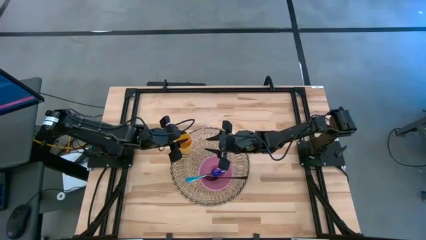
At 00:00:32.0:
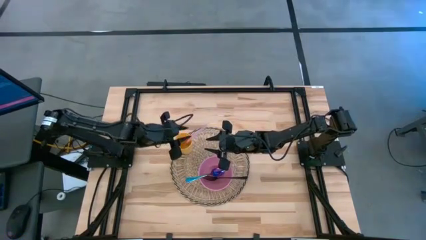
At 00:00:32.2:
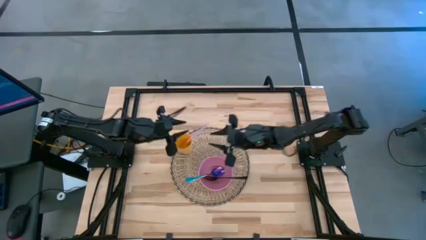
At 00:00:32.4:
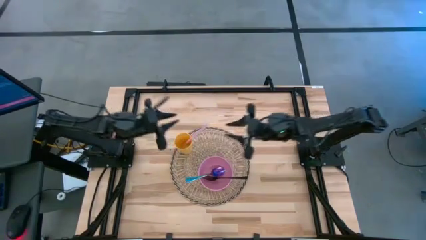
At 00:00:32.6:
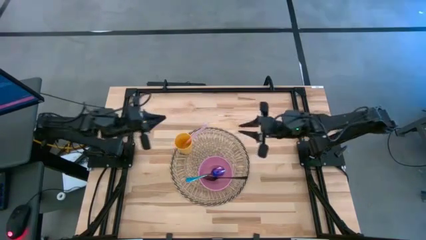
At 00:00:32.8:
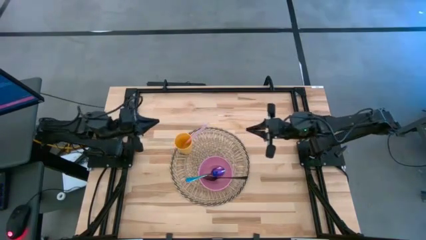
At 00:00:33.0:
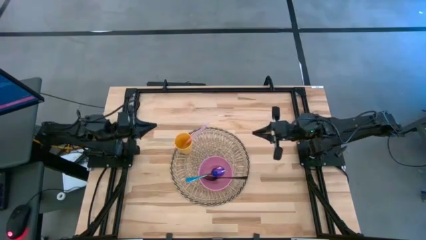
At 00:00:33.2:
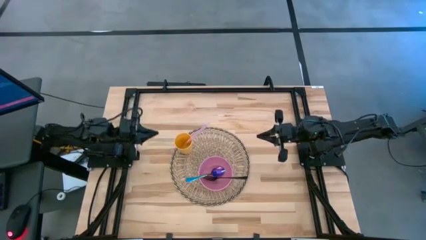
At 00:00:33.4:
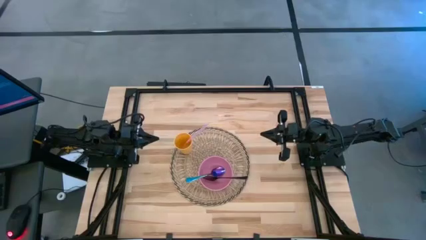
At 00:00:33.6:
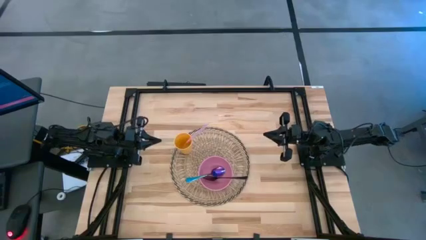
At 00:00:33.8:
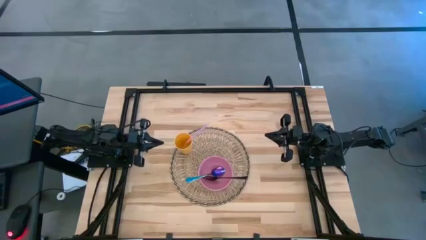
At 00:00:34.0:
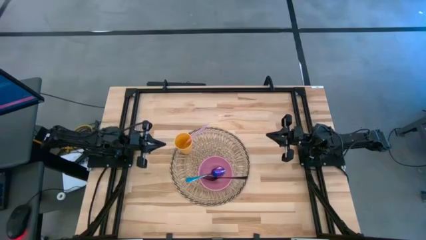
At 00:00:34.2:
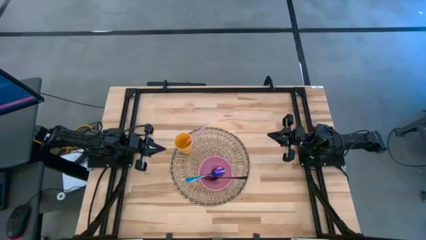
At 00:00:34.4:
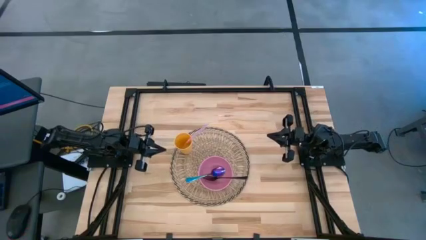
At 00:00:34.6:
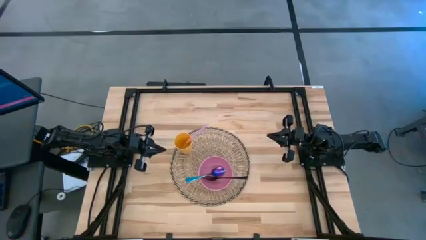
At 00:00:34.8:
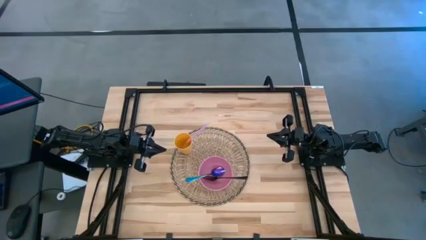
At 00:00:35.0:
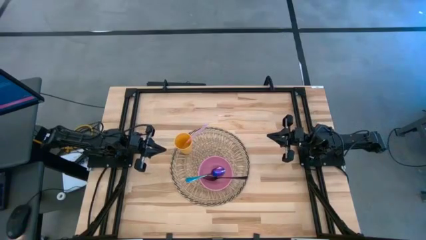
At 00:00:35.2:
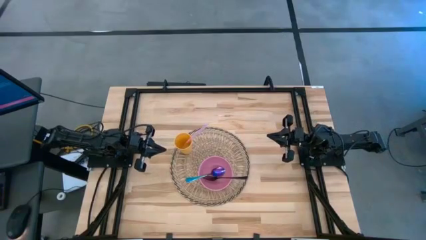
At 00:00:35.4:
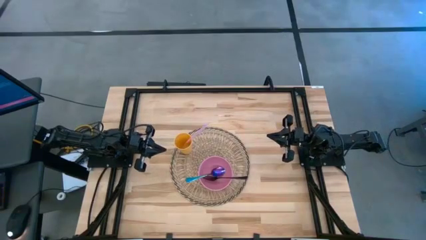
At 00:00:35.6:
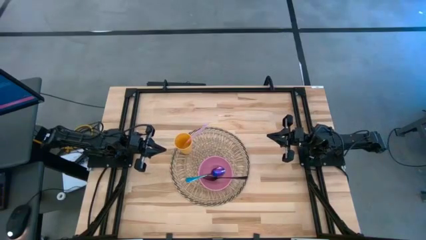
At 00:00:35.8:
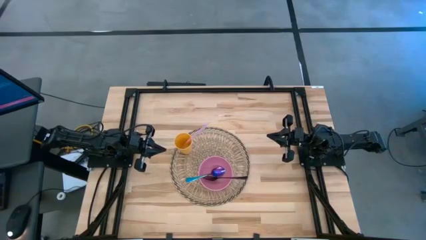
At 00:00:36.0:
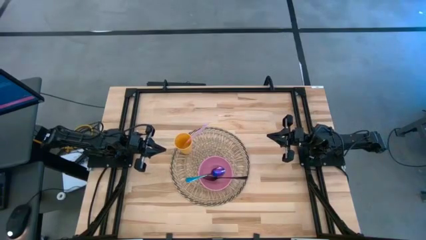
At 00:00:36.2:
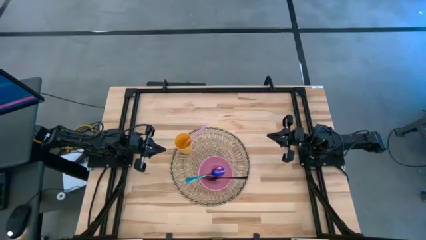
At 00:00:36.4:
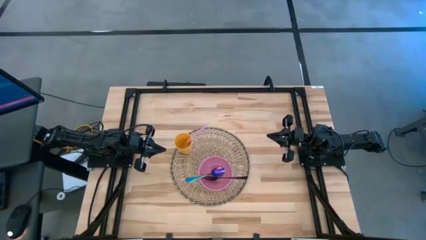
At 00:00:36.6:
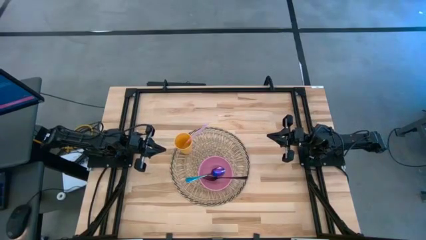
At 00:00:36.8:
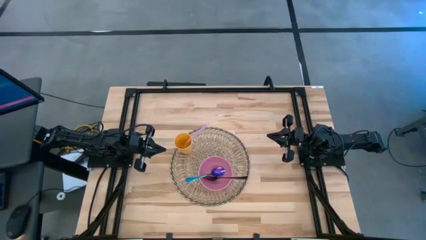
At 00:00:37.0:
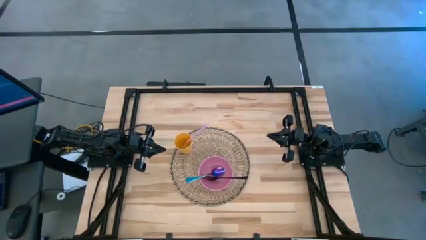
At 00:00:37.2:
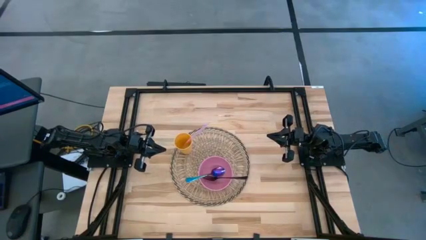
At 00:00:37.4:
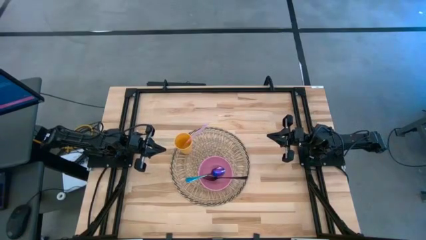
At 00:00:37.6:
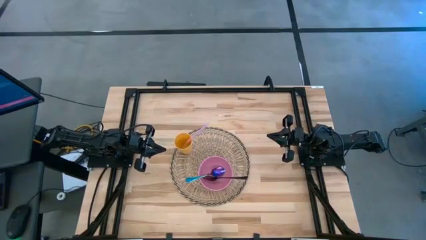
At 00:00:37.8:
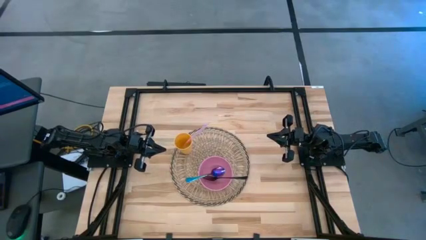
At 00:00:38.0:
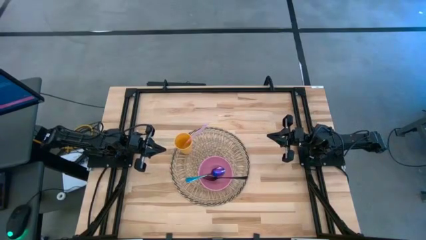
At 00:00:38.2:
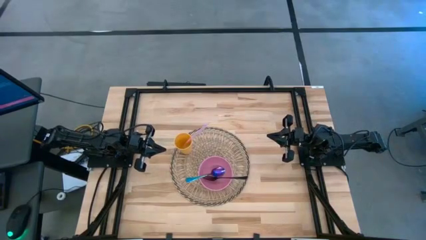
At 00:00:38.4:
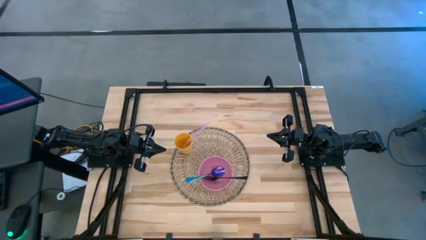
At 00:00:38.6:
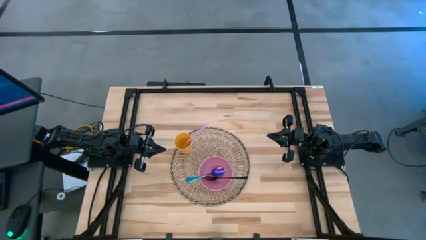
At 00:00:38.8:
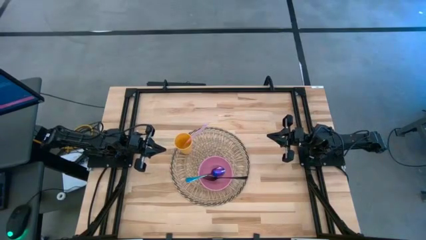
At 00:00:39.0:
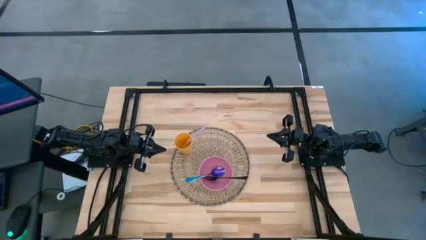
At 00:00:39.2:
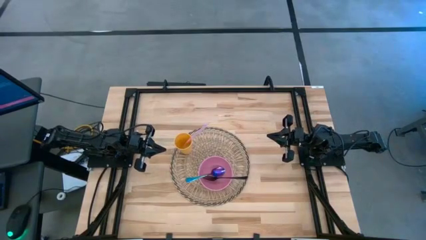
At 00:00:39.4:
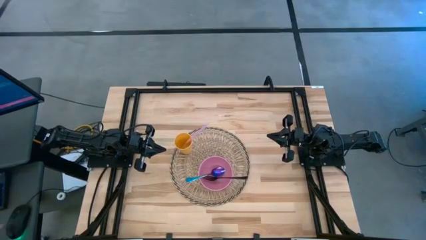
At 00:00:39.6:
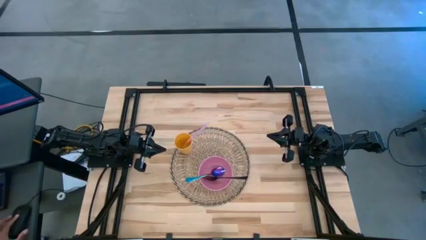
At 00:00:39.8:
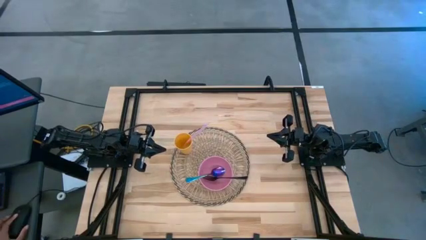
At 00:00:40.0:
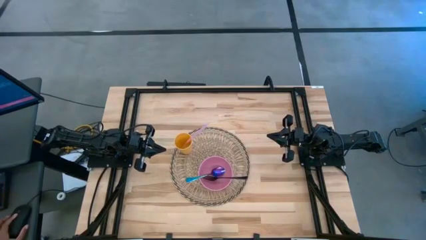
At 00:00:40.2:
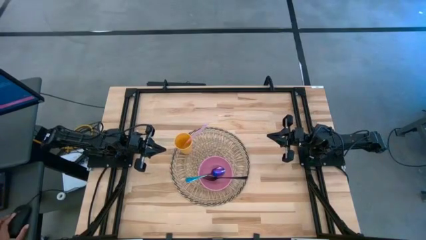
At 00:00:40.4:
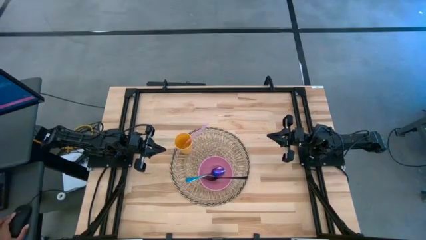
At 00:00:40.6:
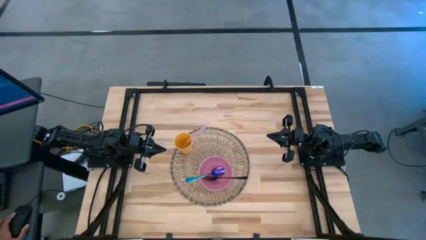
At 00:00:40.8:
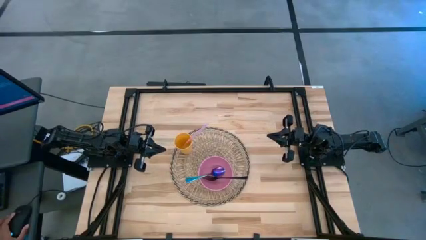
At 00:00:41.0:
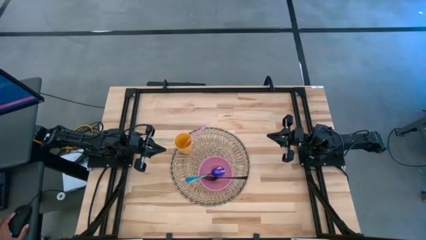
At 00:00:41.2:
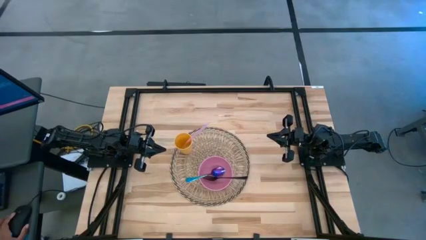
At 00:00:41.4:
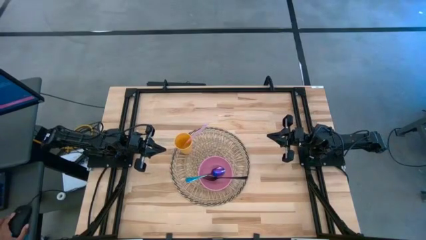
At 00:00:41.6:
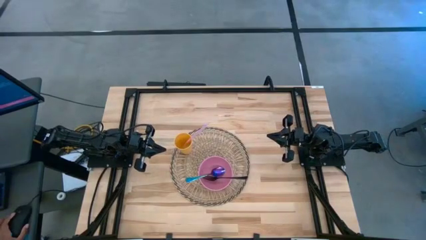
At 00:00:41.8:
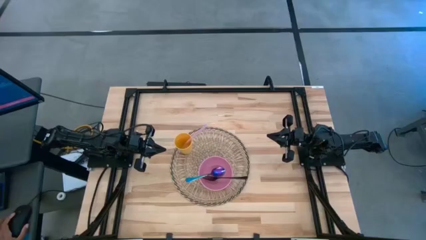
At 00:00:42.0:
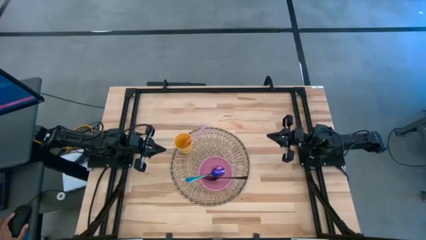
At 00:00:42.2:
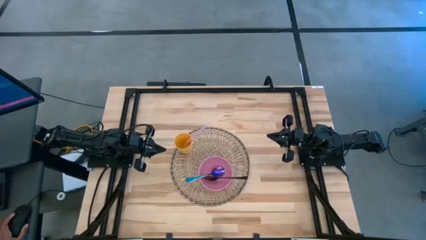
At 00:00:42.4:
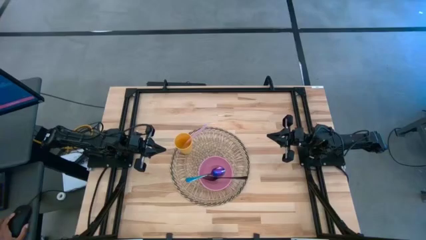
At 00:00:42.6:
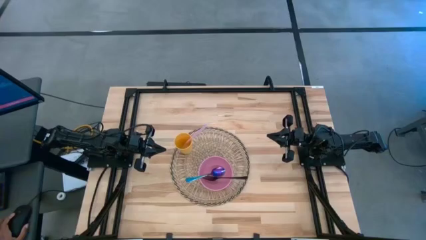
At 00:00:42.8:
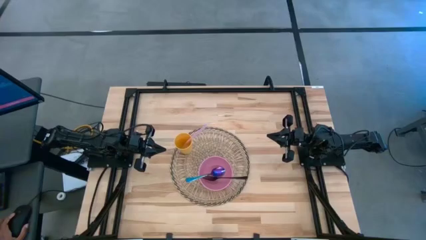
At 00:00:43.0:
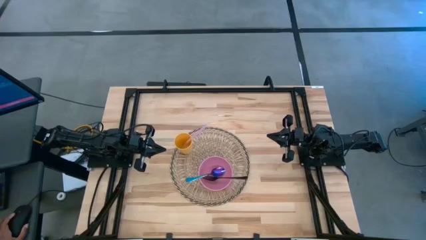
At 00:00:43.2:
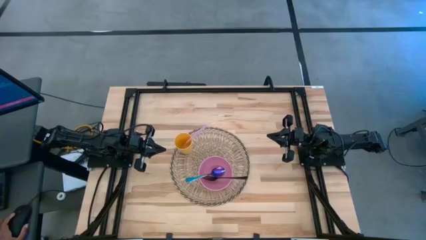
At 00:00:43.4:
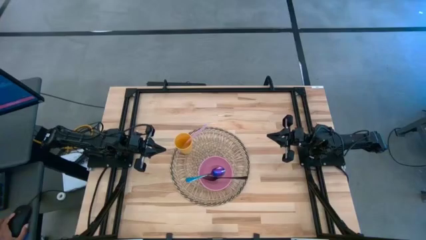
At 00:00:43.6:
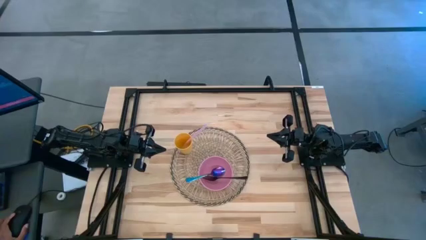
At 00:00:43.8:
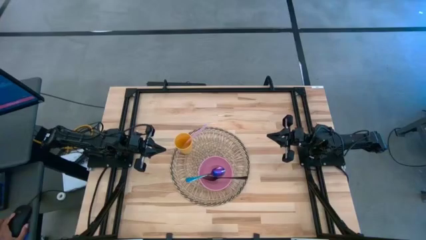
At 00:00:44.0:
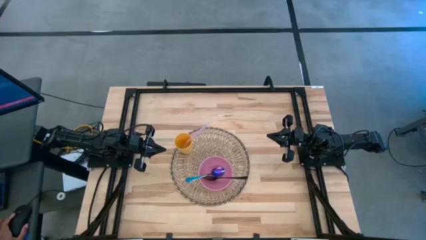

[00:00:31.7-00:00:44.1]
Task: Pick & Place Utensil
Return to Home Position
